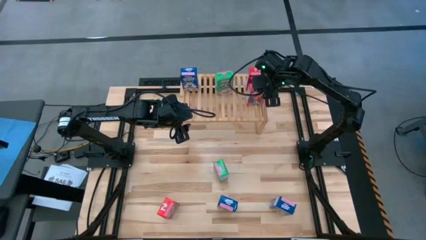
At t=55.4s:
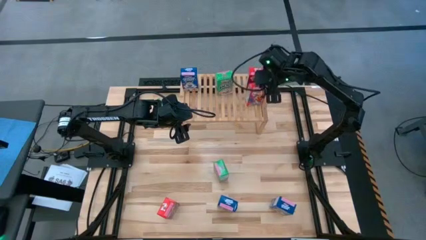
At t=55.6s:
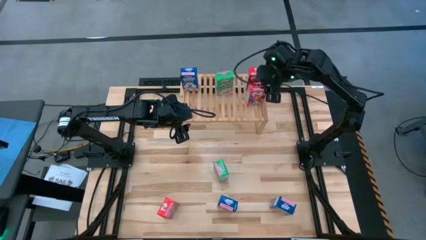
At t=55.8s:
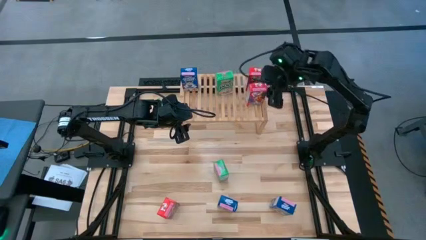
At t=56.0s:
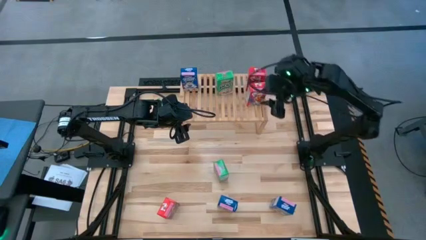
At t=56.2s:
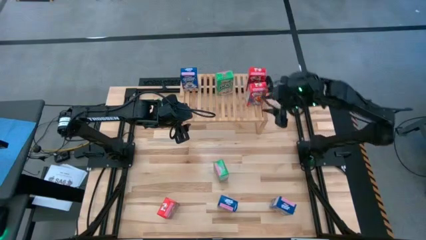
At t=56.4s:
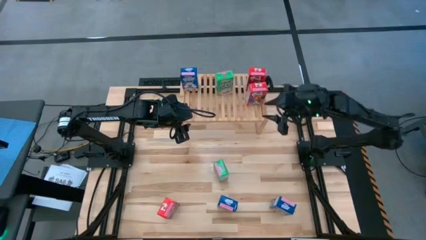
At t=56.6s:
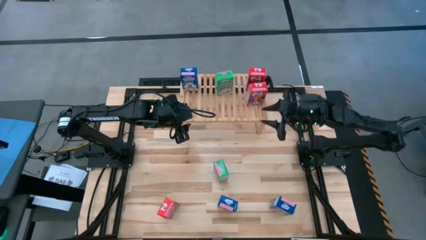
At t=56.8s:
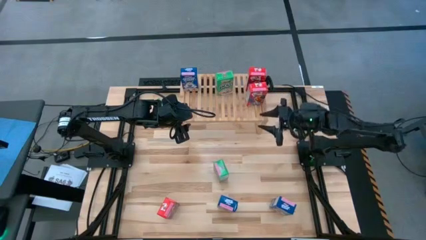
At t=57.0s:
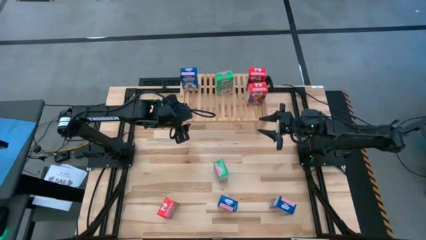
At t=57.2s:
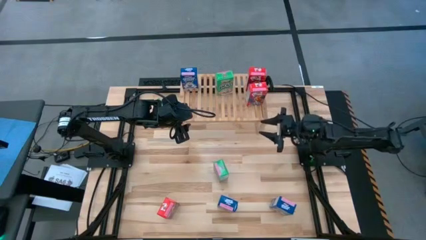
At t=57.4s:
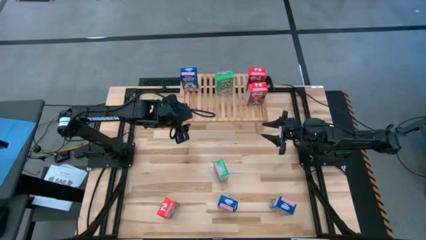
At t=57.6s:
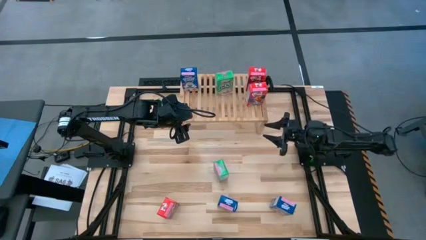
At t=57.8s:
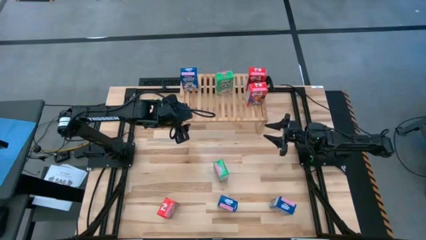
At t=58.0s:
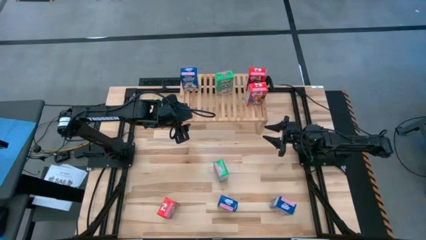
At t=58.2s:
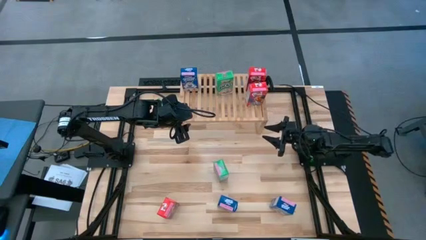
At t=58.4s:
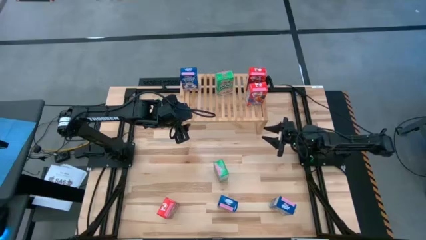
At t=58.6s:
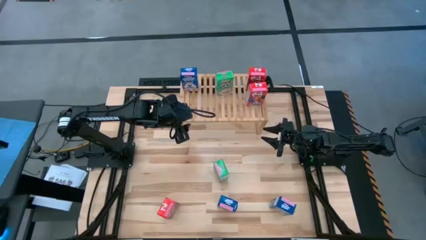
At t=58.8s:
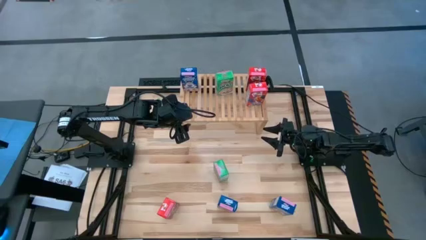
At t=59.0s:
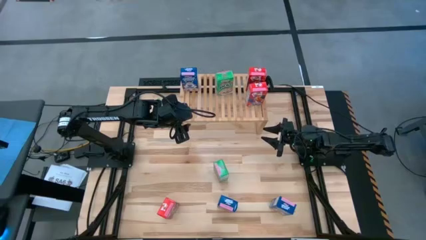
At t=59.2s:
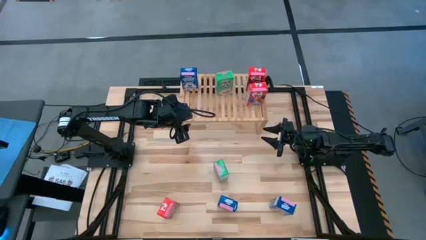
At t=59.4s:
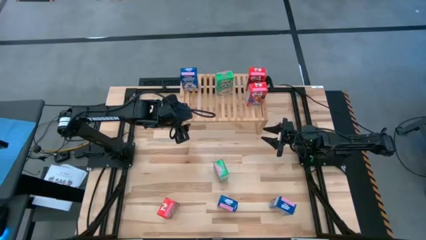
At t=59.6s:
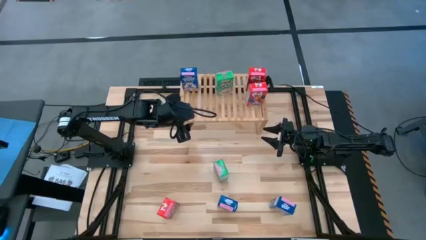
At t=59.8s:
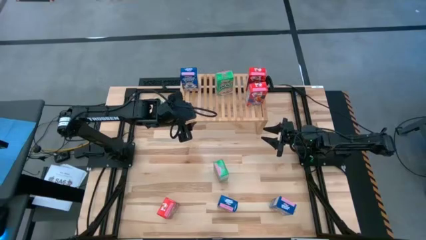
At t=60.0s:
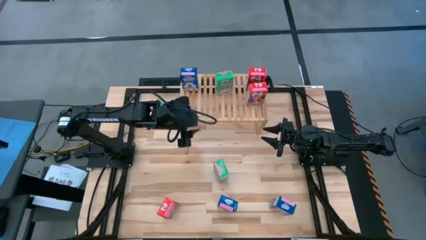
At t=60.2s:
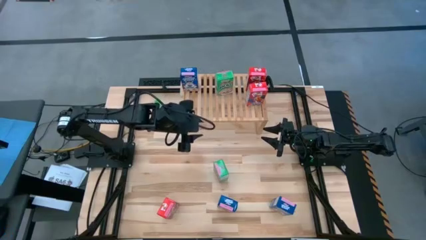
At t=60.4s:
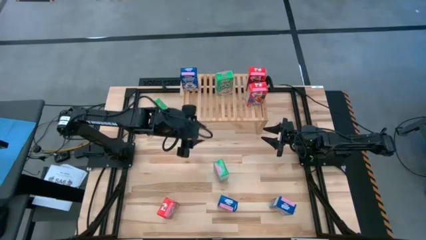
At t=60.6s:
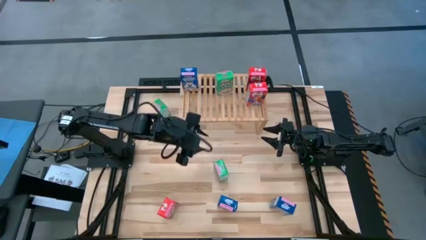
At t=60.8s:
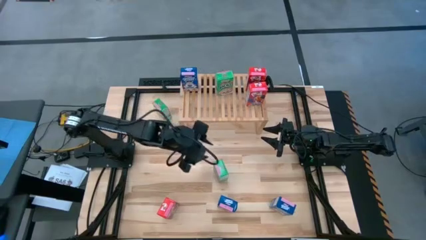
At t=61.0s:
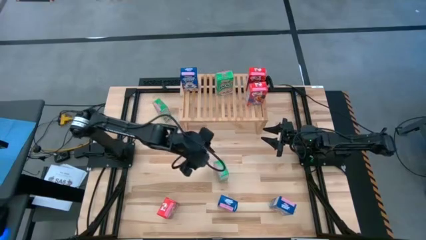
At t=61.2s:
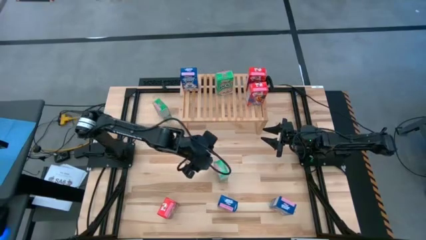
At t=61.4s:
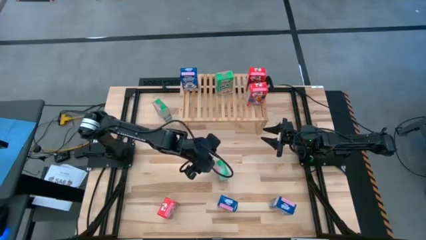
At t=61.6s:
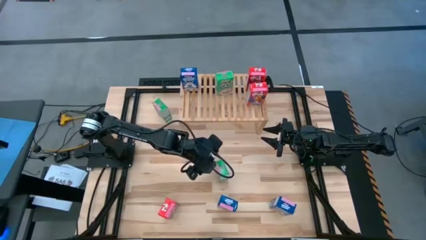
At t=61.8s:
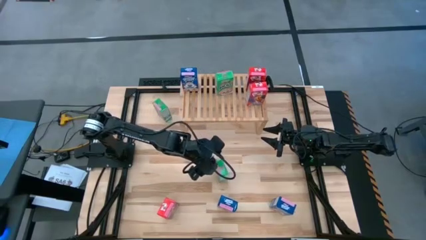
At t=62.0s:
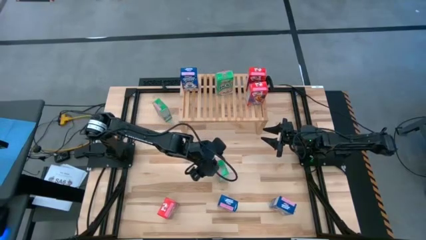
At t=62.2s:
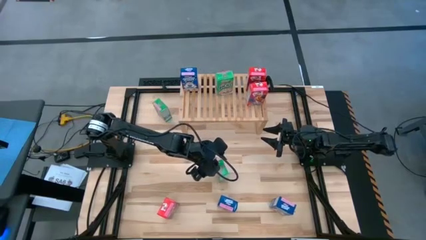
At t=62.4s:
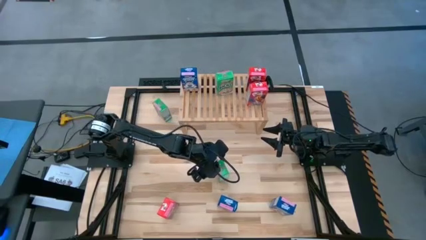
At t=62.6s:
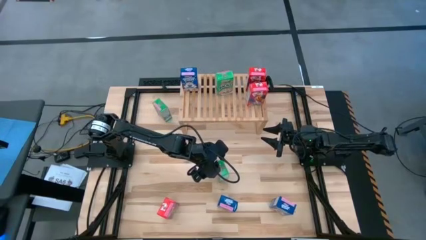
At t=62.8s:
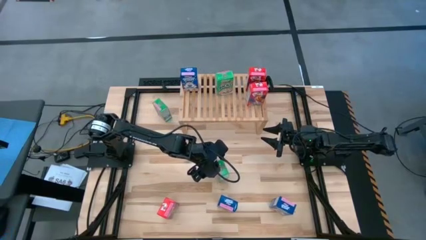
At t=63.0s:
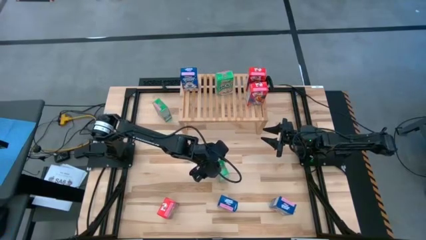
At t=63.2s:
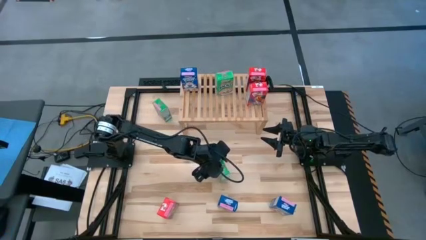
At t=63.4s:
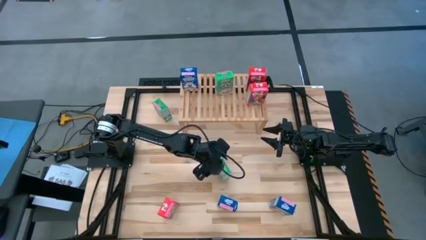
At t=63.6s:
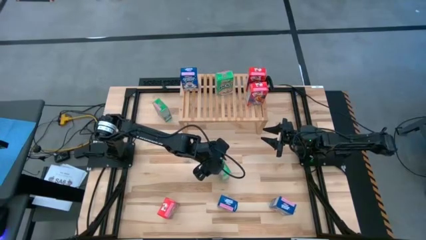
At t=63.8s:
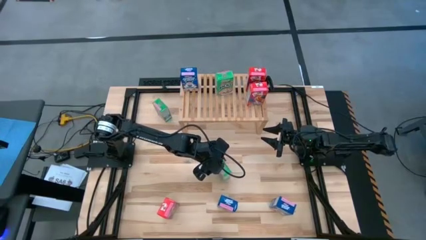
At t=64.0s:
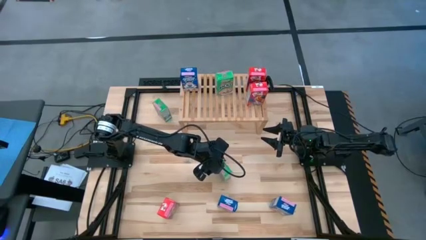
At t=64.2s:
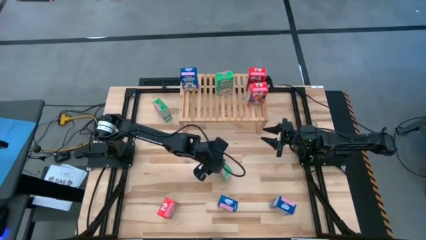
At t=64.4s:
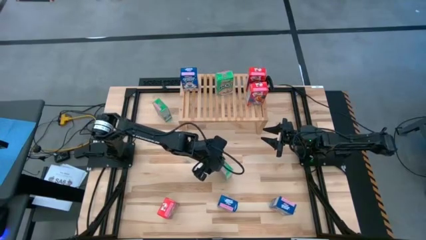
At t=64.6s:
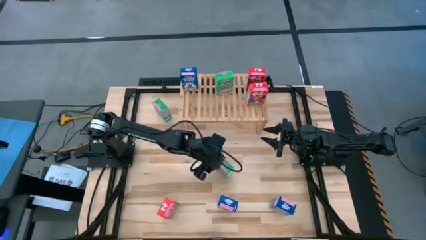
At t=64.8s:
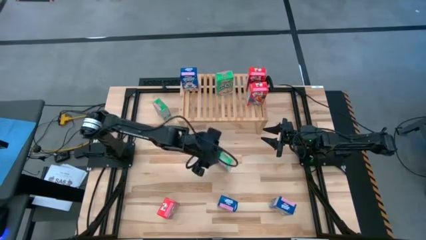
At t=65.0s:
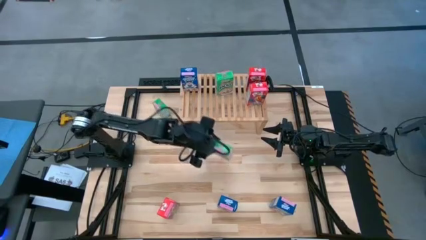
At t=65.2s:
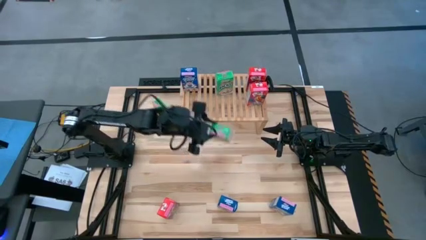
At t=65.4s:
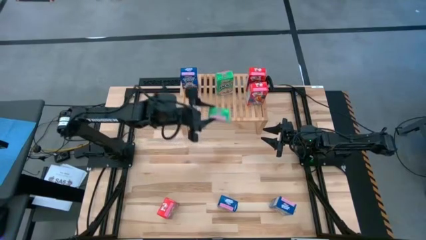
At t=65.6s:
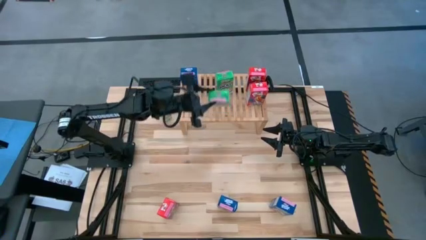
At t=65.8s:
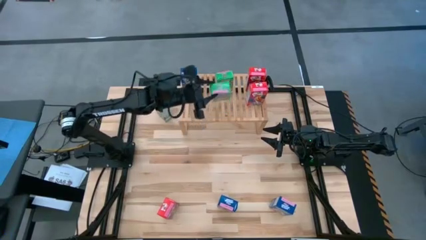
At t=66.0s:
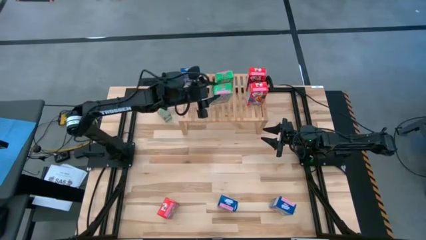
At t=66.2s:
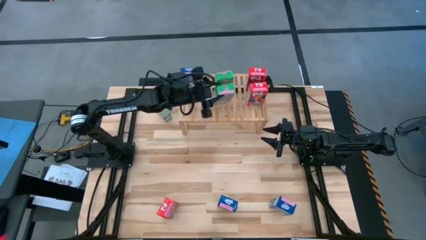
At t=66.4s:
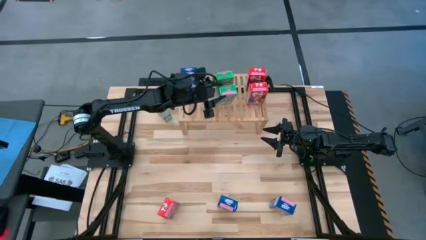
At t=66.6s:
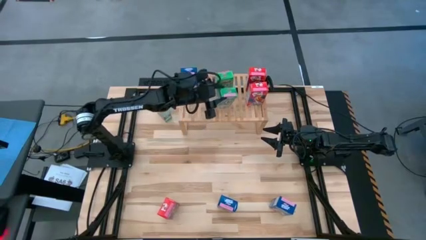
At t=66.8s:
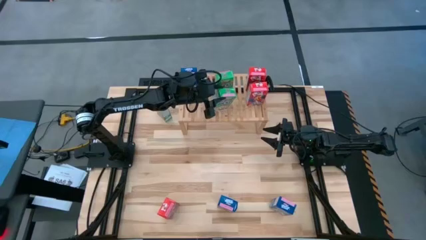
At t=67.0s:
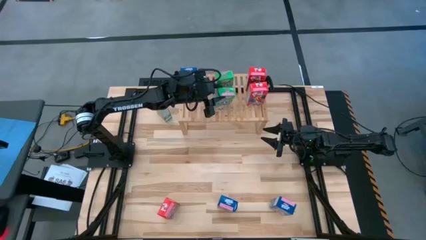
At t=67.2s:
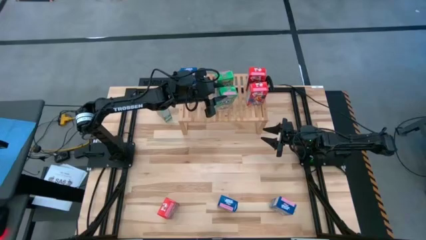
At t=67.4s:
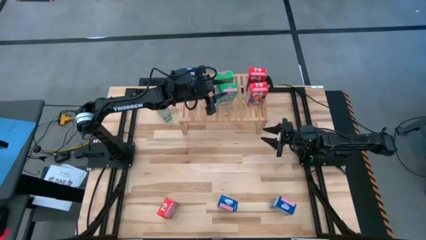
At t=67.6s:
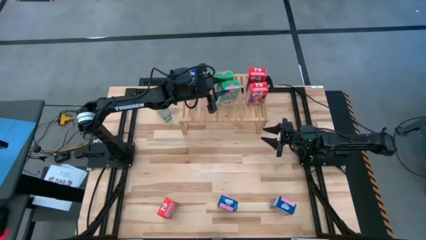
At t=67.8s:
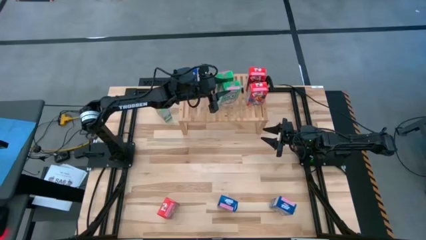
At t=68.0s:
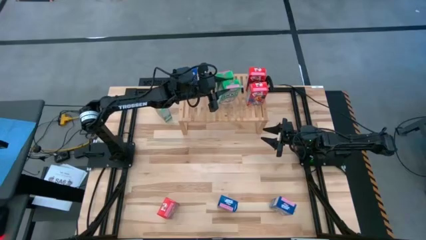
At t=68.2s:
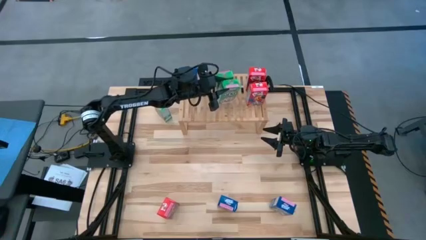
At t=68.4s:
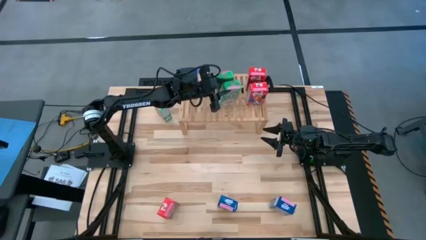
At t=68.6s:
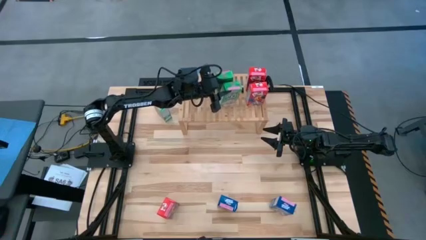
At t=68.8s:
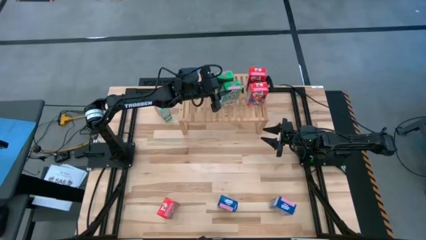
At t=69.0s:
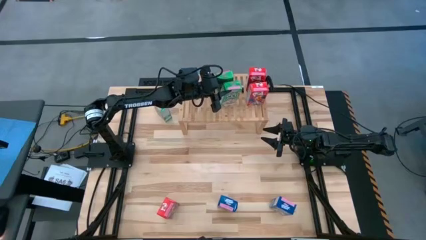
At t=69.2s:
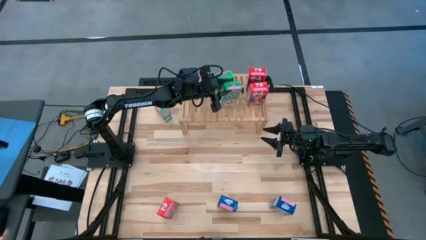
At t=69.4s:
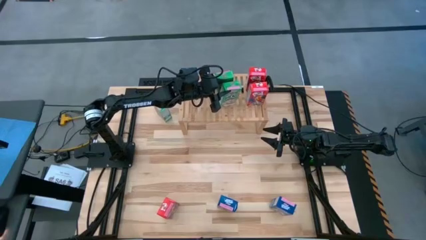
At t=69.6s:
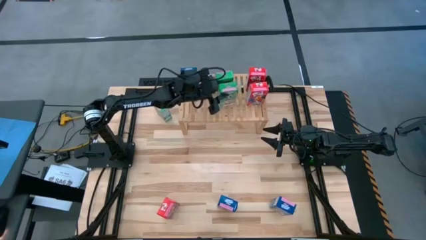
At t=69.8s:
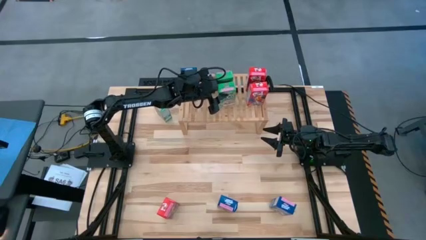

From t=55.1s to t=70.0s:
Task: Stack cereal on shelf
Put the bottom green cereal box on the shelf aligned with the other green cereal box
